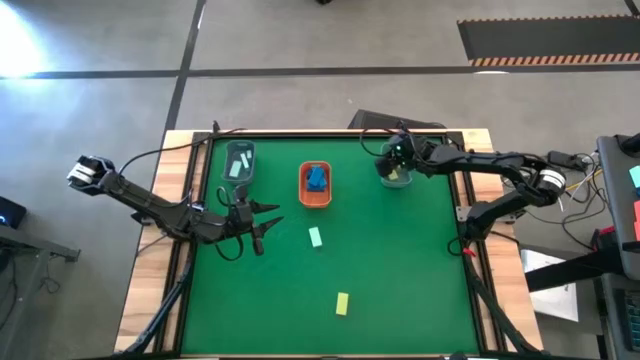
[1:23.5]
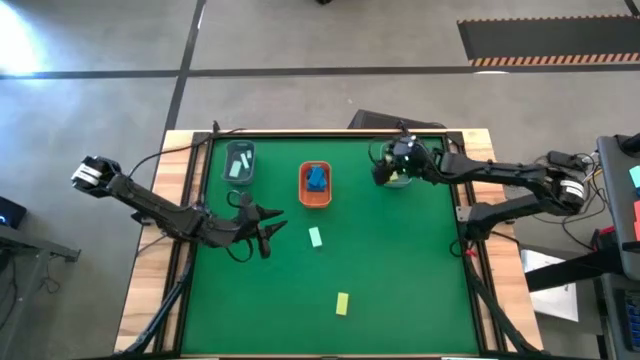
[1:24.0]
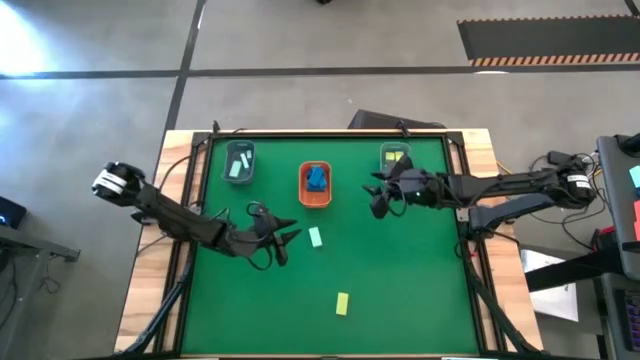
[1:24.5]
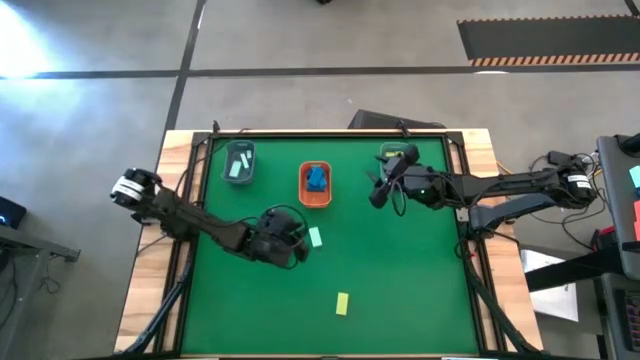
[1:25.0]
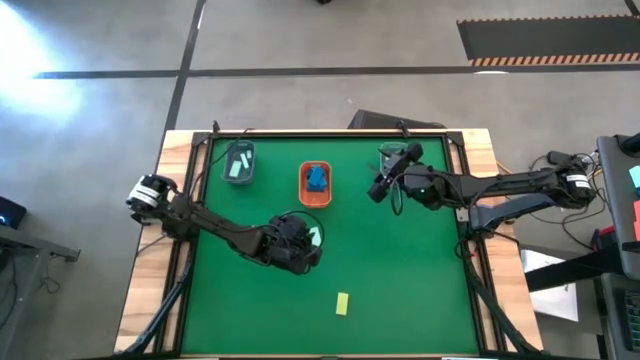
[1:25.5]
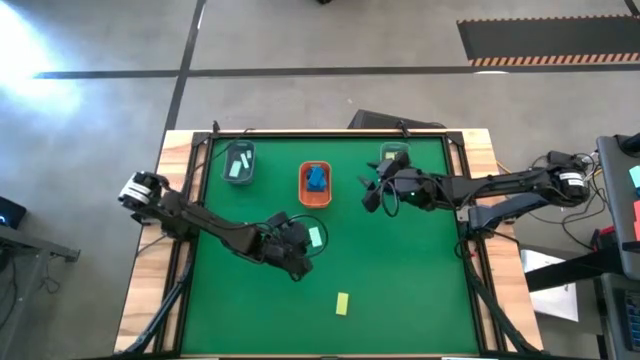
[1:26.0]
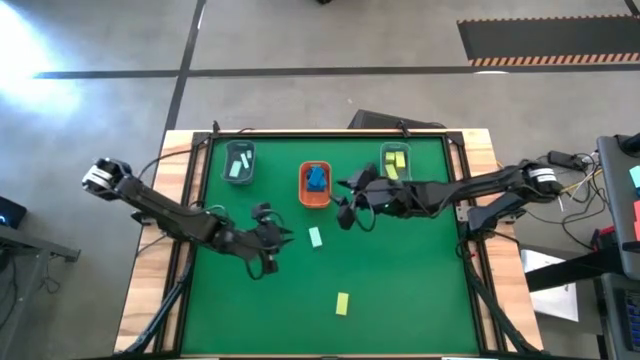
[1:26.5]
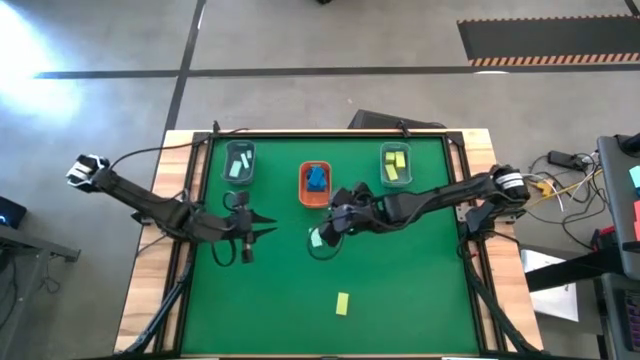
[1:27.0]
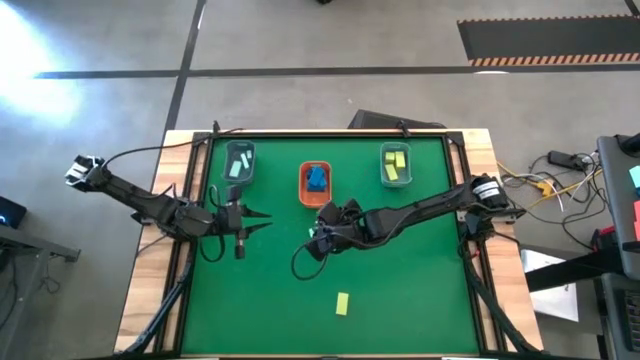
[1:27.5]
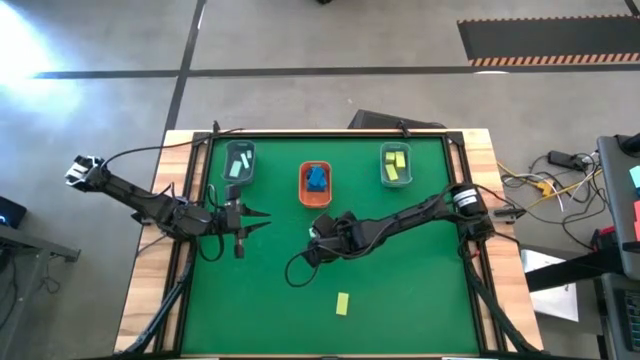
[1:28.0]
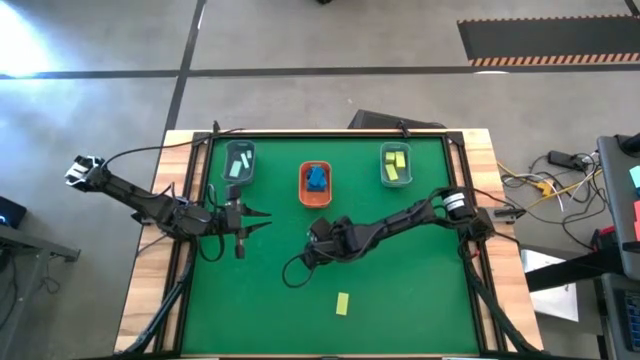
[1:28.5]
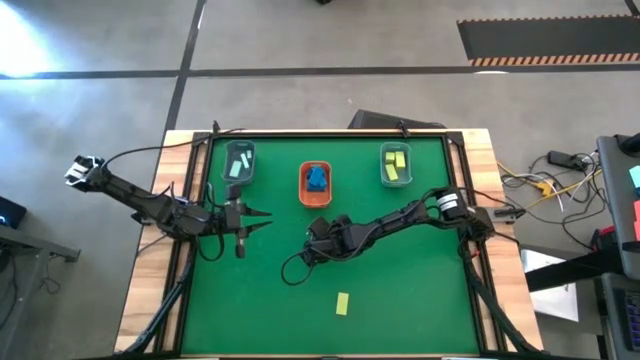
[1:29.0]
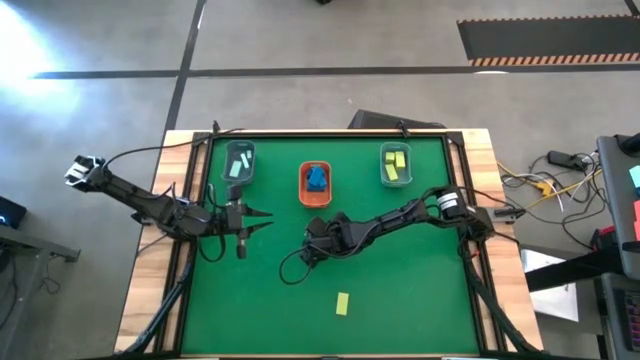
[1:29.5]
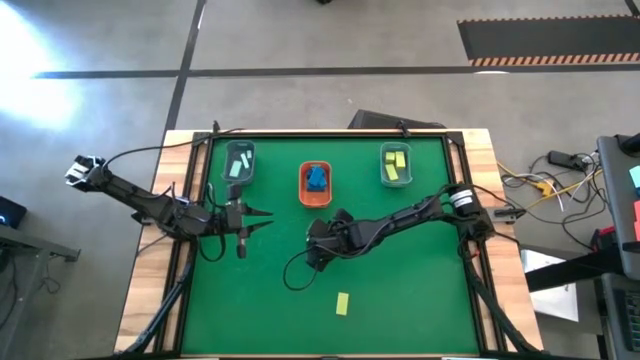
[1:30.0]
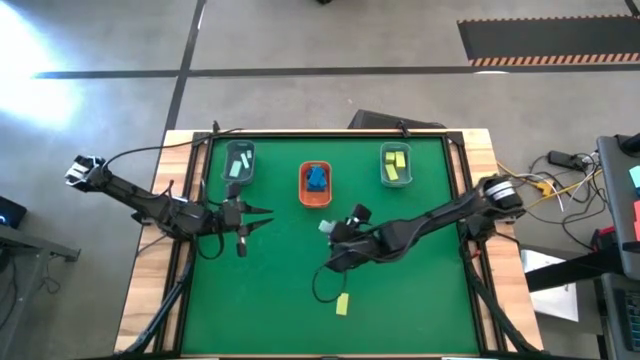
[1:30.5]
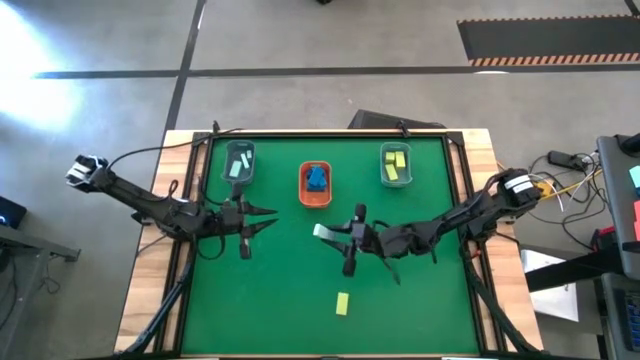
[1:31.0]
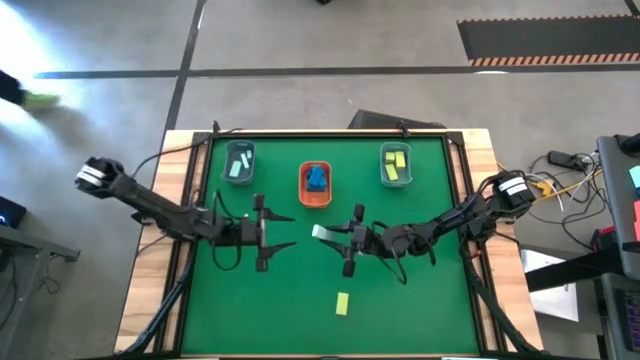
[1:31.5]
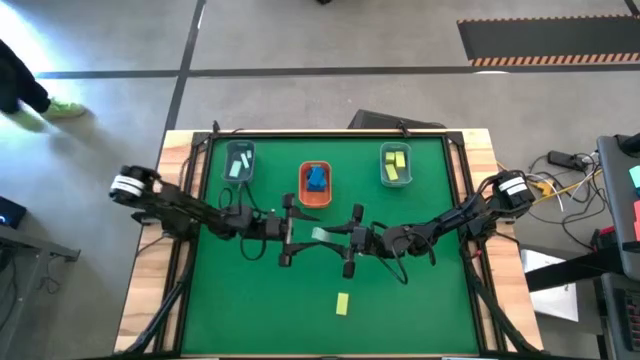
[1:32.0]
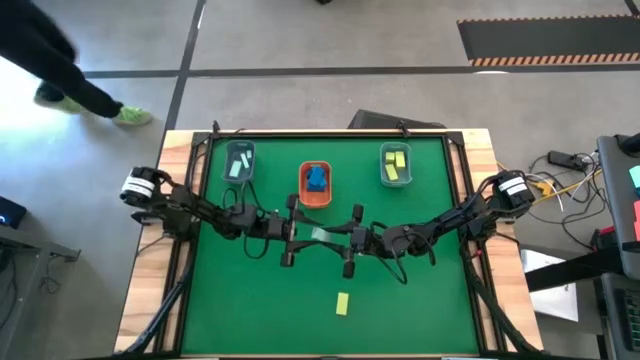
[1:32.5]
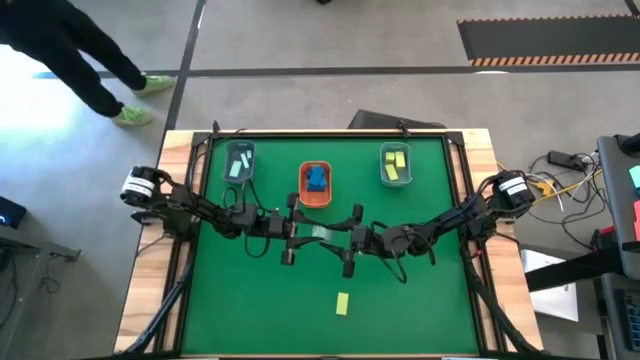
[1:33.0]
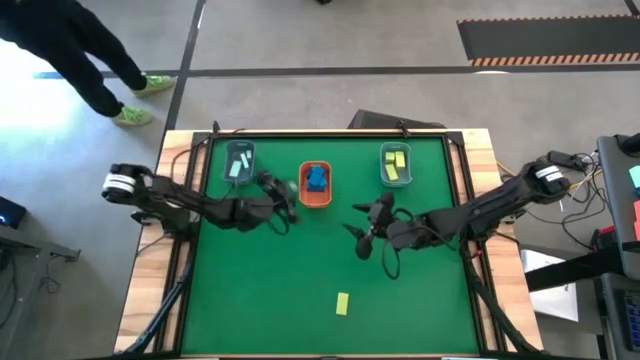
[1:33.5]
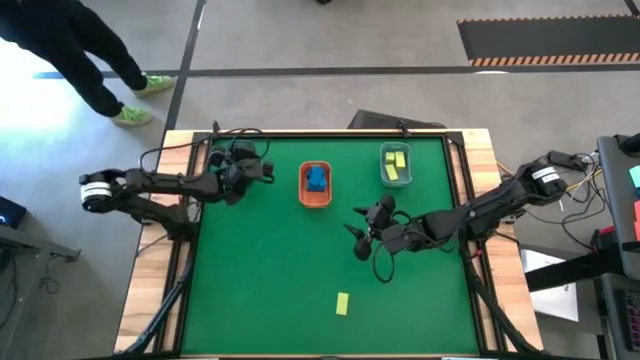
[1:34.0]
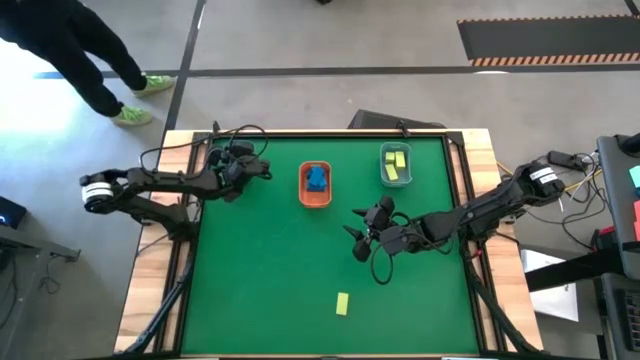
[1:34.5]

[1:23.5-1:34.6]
Task: Sort & place blocks by color
Put the light blue wooden block into the gray bin

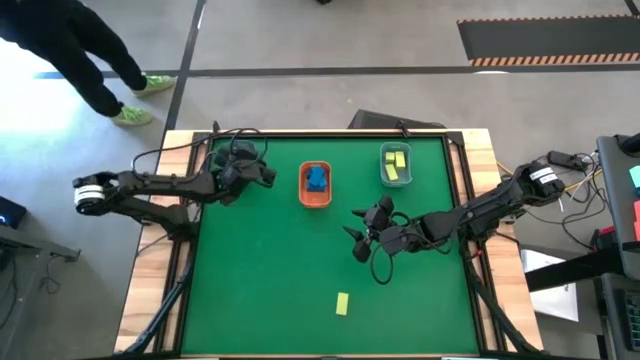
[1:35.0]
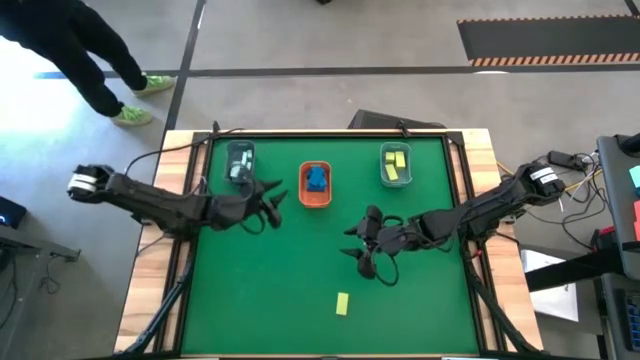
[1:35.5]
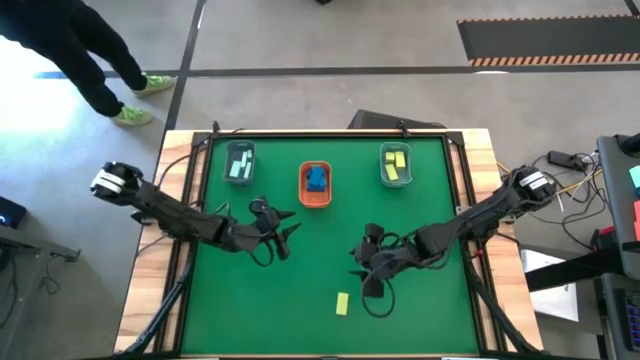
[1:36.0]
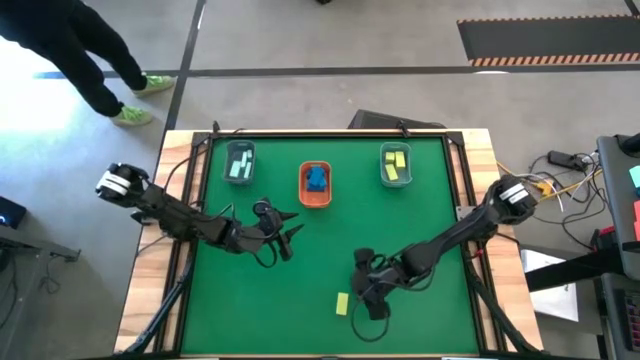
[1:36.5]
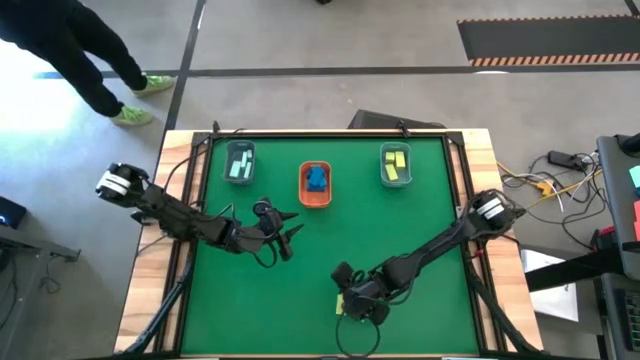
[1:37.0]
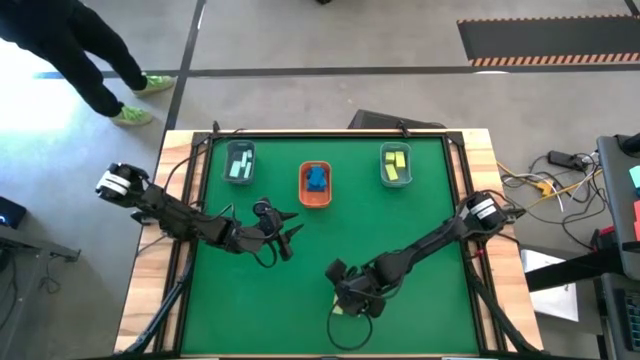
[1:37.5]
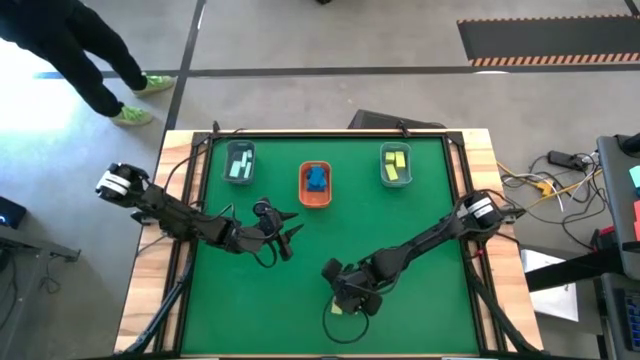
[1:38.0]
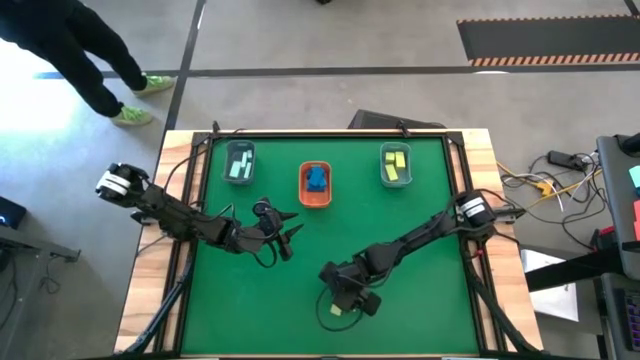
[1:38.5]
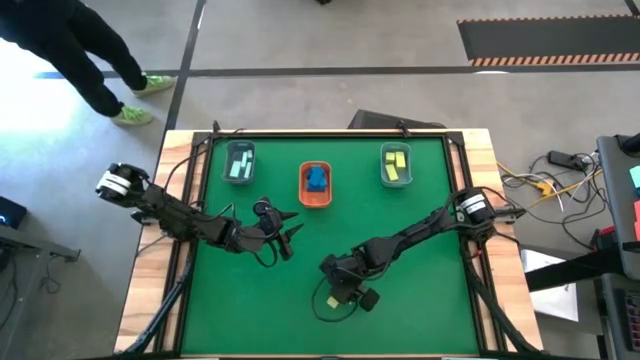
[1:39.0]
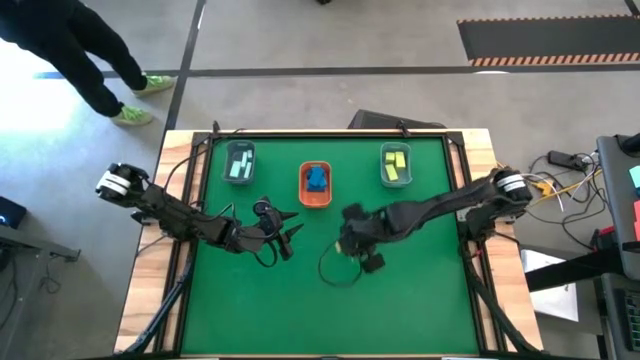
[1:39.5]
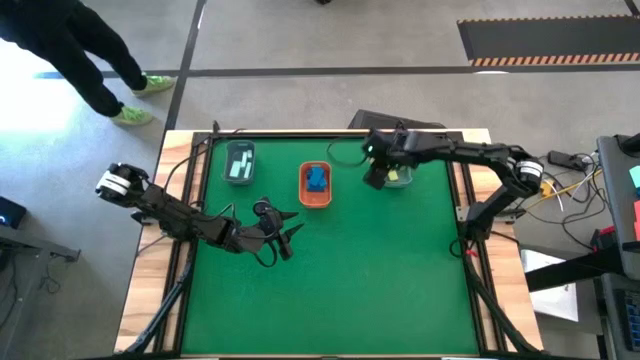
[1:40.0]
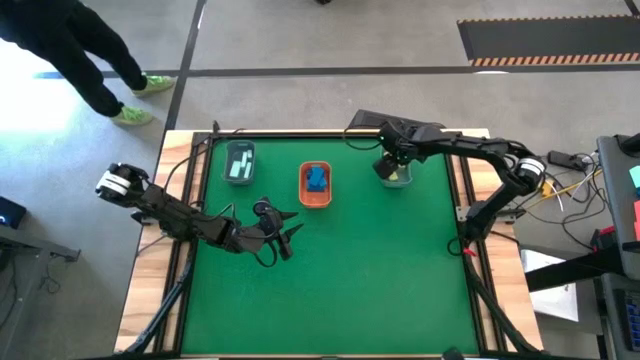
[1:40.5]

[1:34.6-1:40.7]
Put the yellow wooden block into the green bin

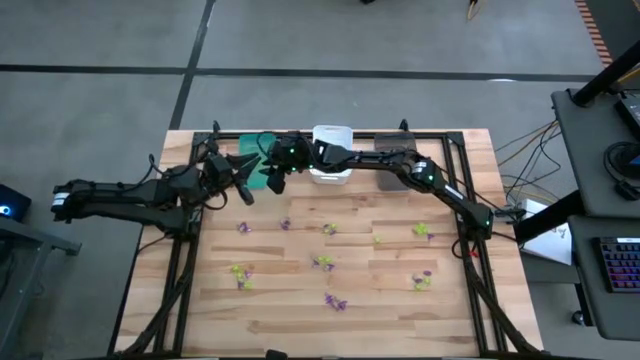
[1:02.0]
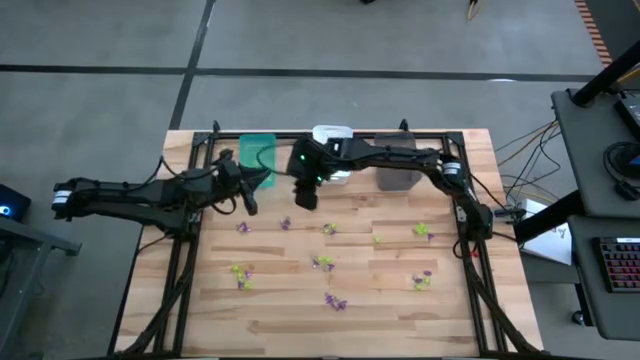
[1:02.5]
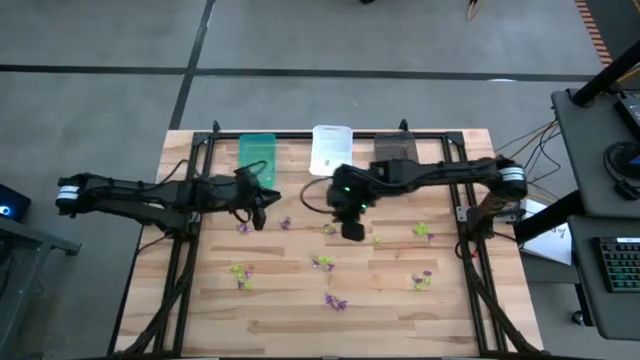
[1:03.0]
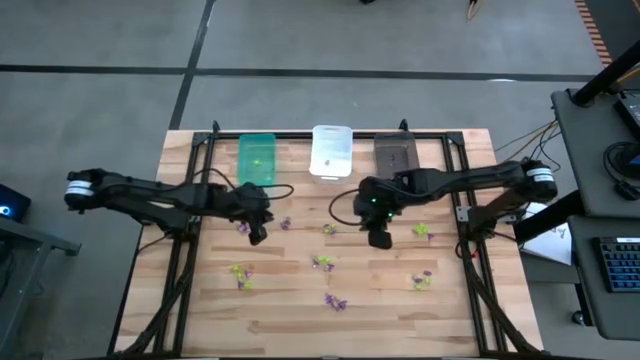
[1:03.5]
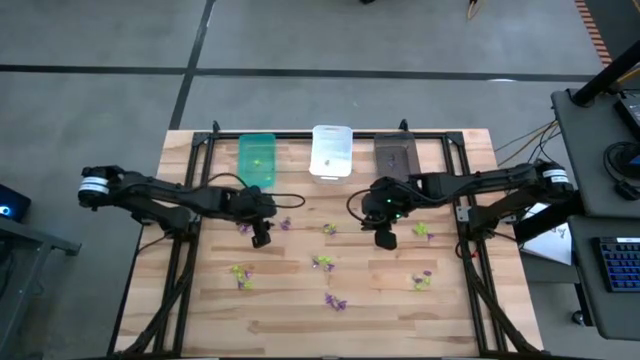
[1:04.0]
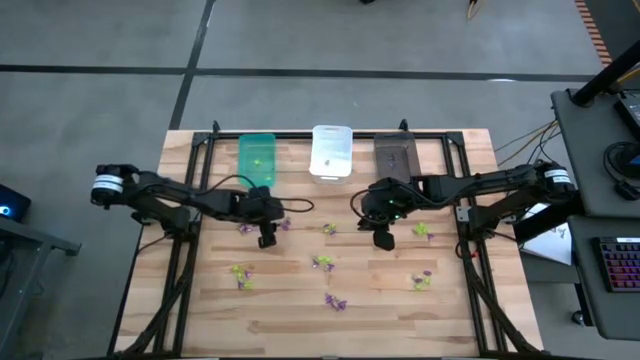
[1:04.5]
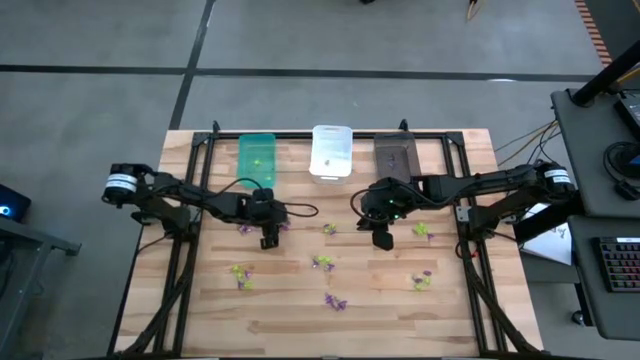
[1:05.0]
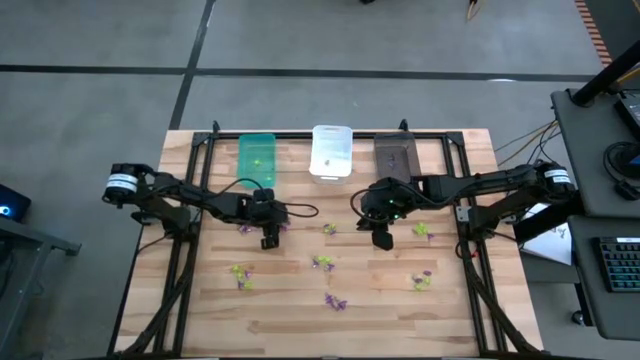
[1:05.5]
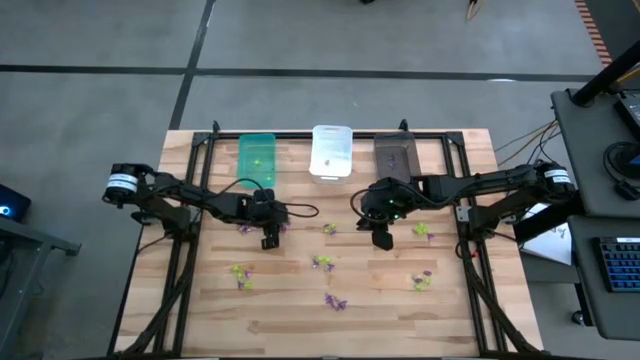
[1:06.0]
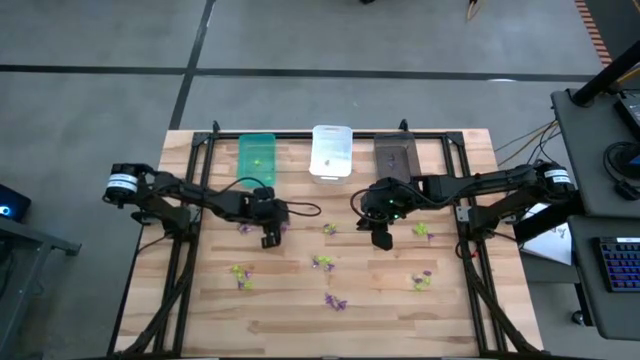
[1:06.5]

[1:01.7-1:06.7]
Task: Sort Halloween decoration
Put the white skull toy into the white bin
